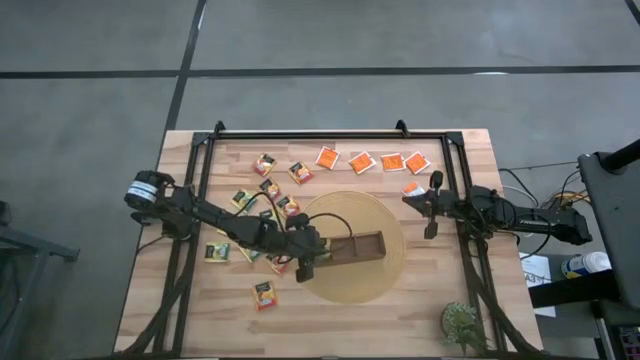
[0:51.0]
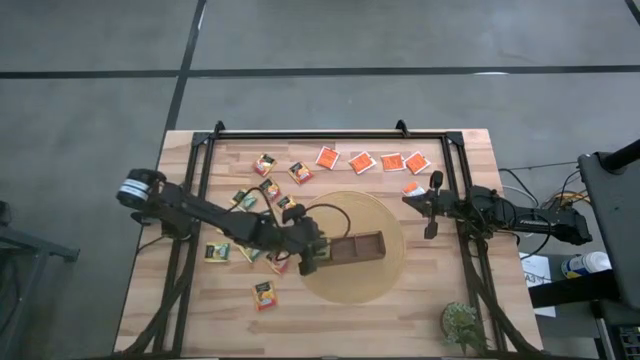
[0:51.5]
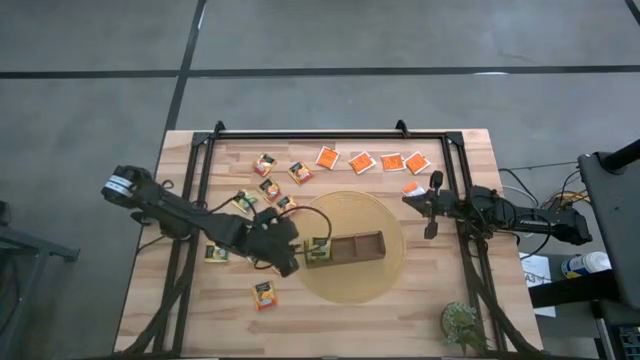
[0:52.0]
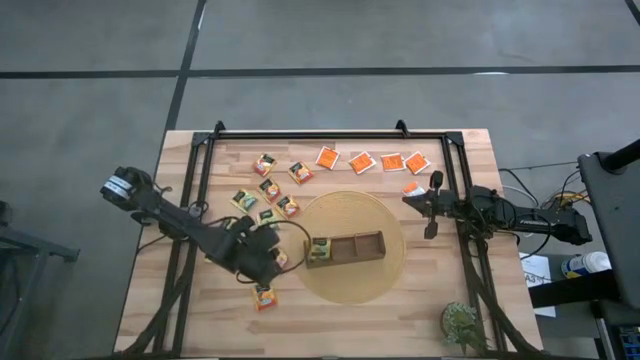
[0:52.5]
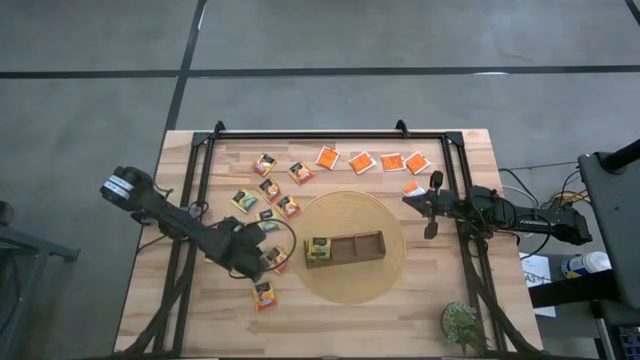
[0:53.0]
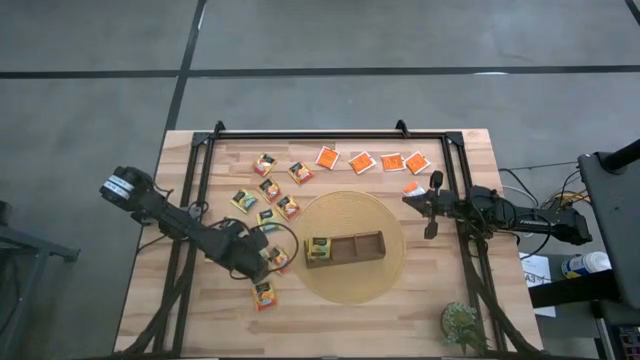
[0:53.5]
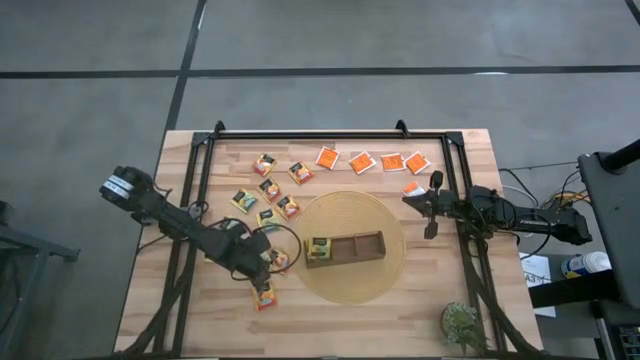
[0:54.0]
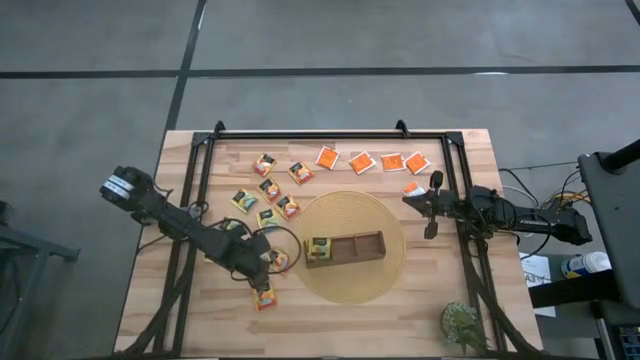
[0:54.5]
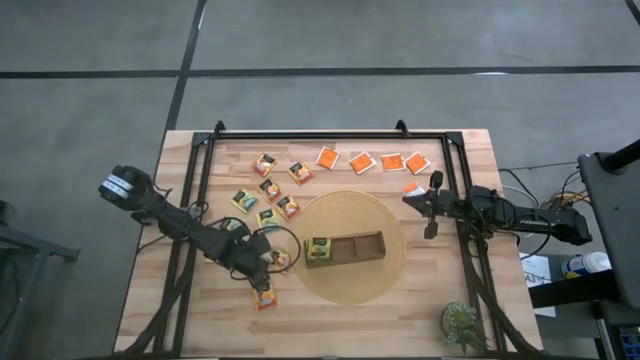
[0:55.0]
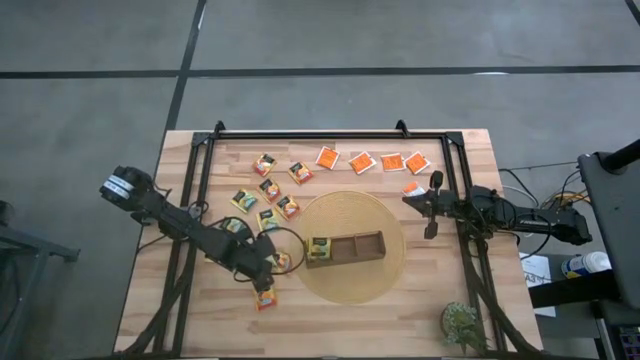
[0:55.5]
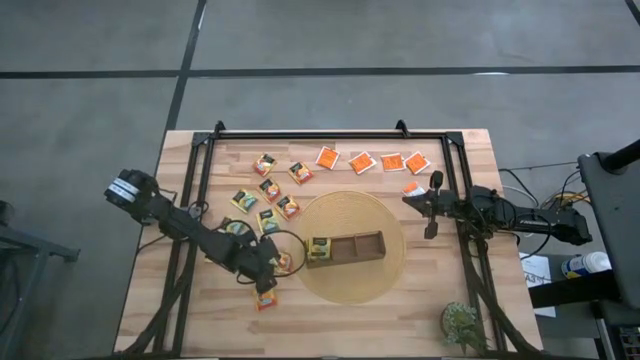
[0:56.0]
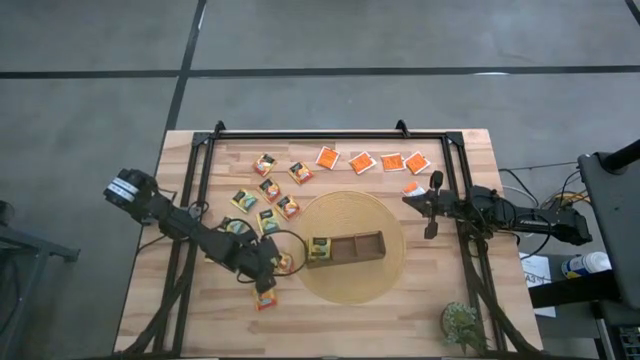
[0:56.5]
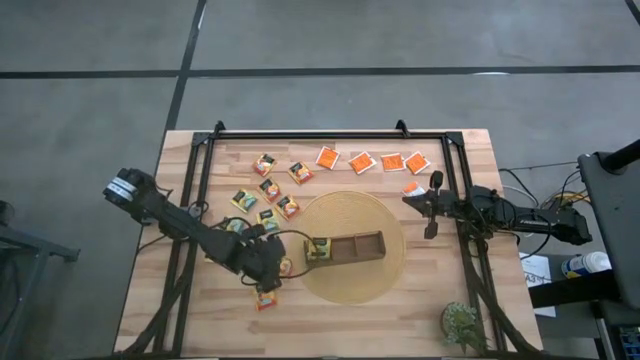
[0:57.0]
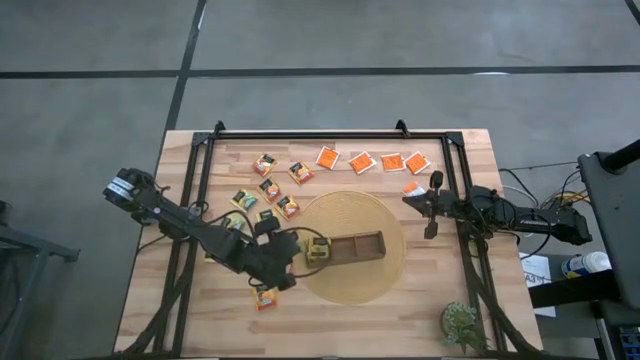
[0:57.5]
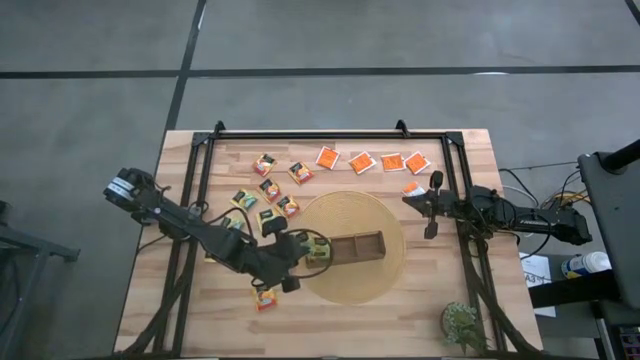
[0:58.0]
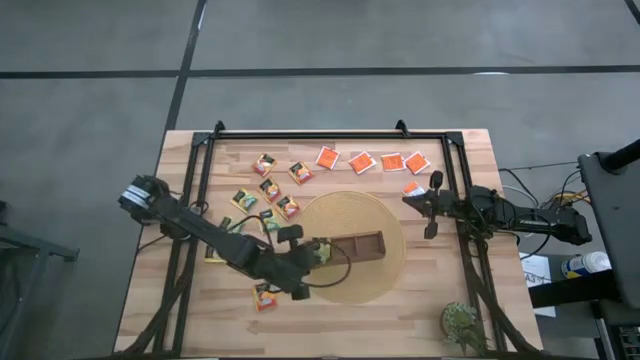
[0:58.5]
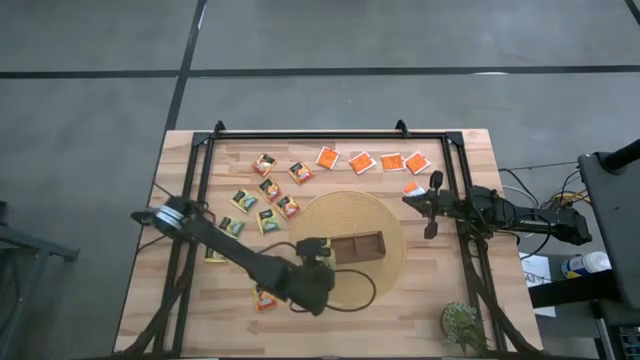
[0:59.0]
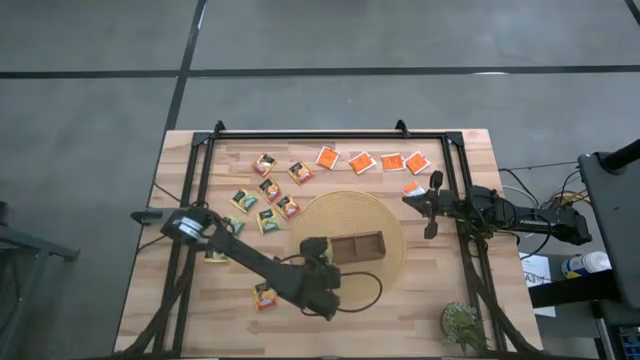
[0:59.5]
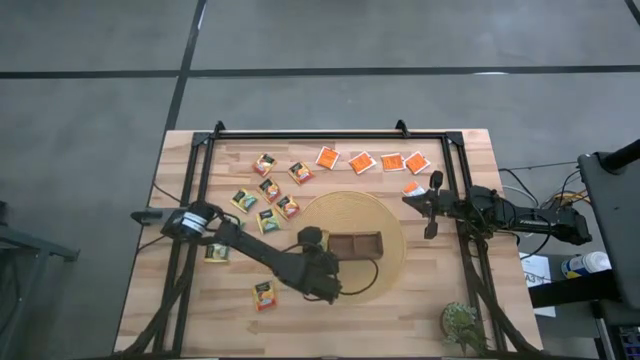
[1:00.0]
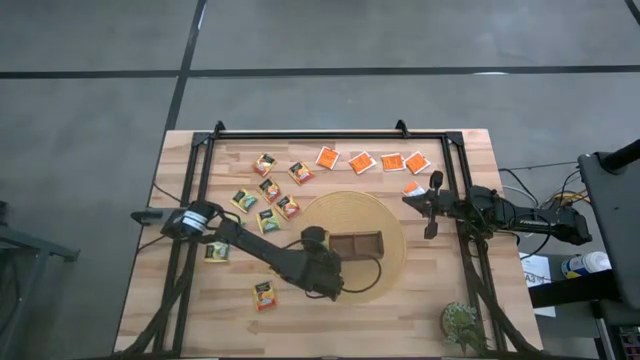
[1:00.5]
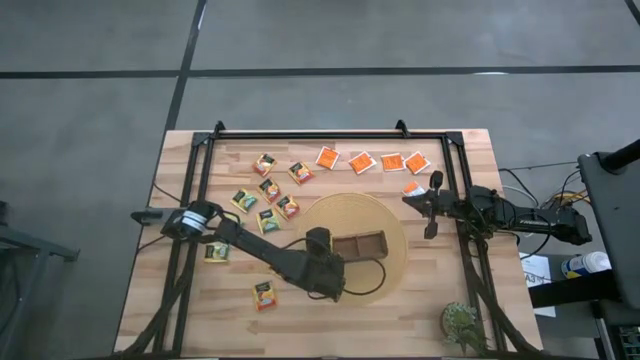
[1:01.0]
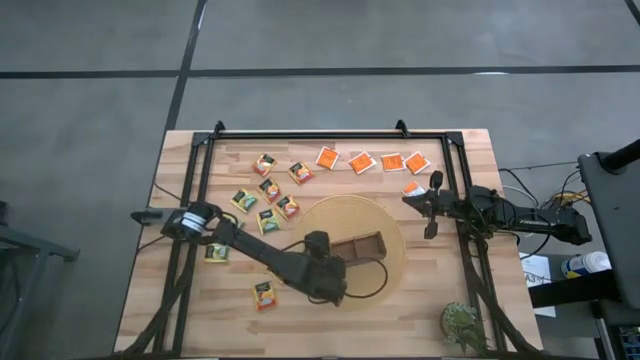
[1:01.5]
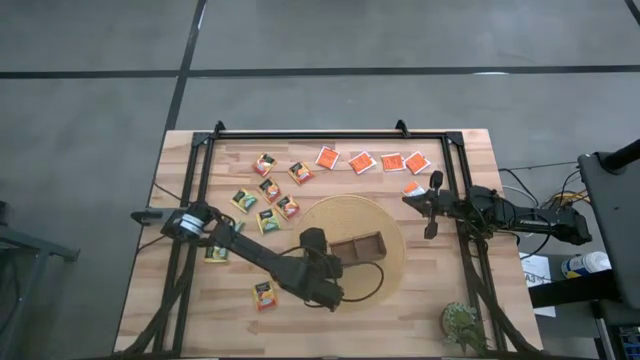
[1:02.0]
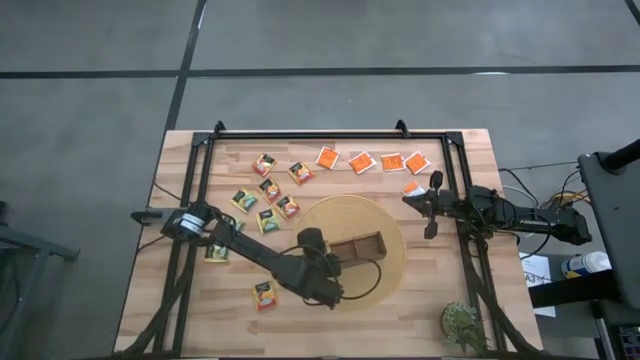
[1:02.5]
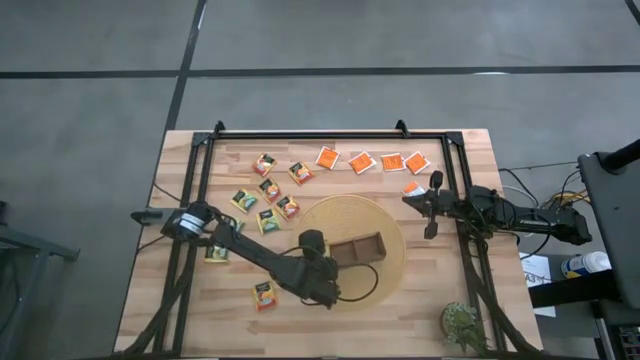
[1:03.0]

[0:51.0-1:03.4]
Task: Pick & Place Tea
Put the green tea bag into the left section of the wooden organizer

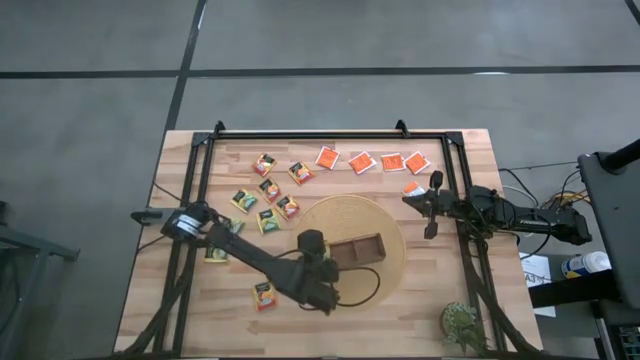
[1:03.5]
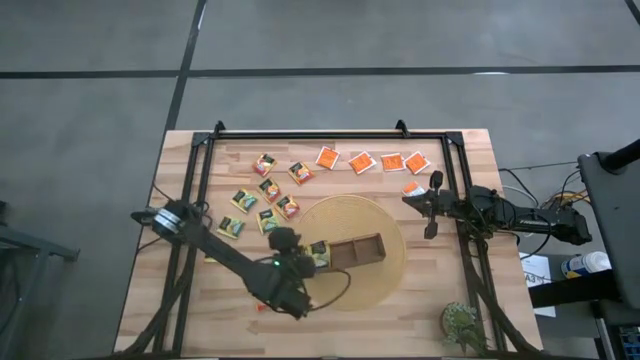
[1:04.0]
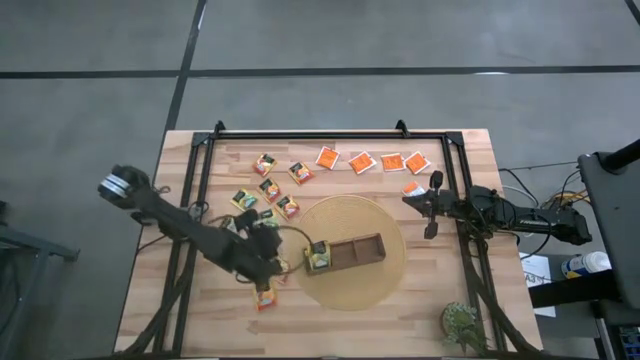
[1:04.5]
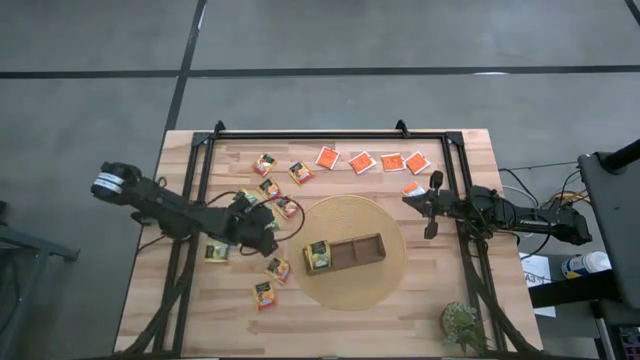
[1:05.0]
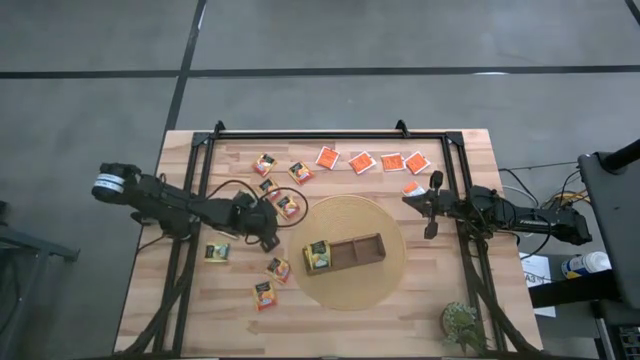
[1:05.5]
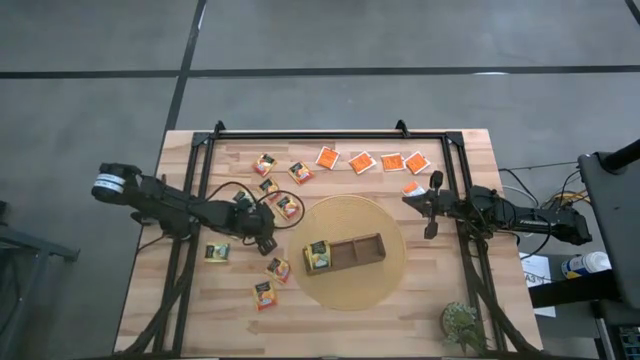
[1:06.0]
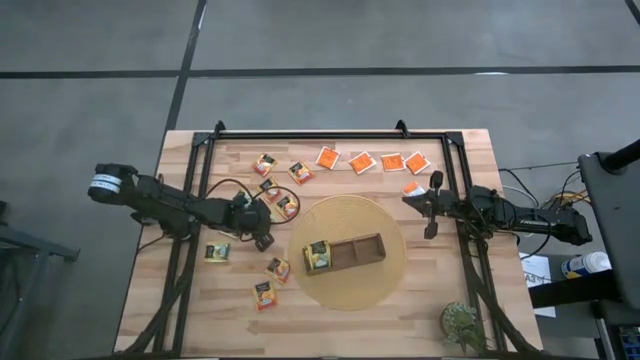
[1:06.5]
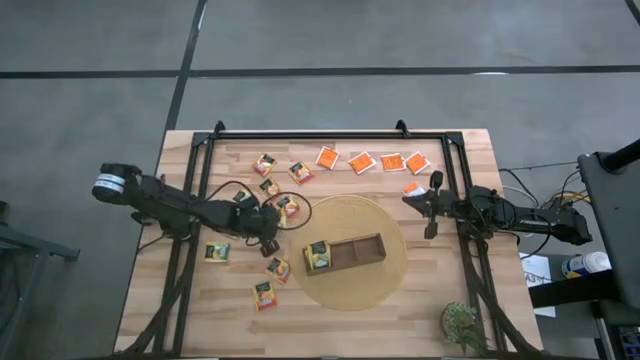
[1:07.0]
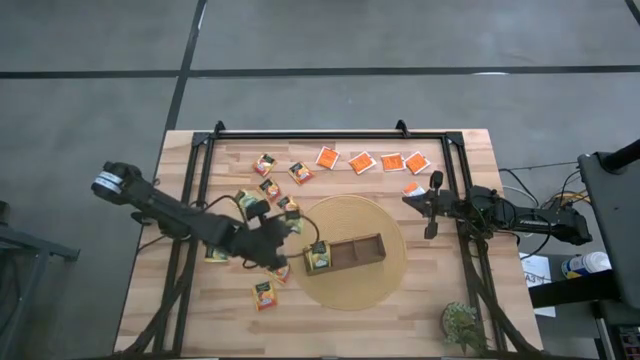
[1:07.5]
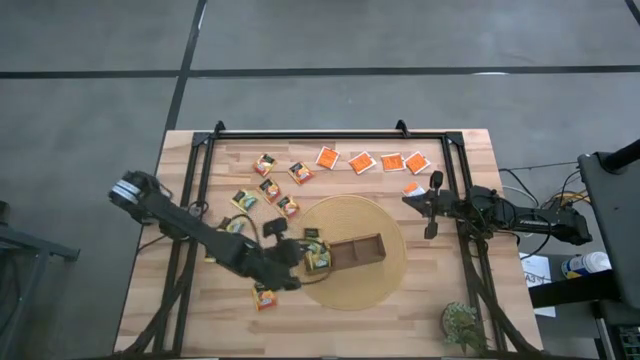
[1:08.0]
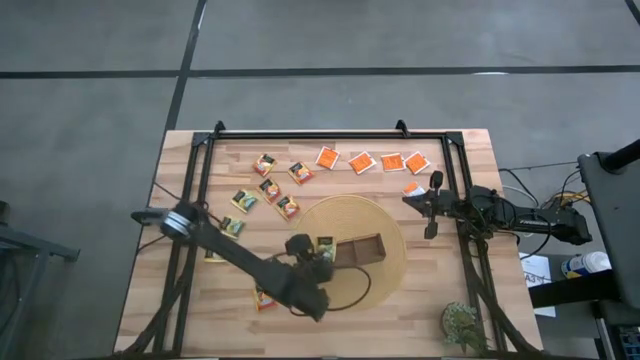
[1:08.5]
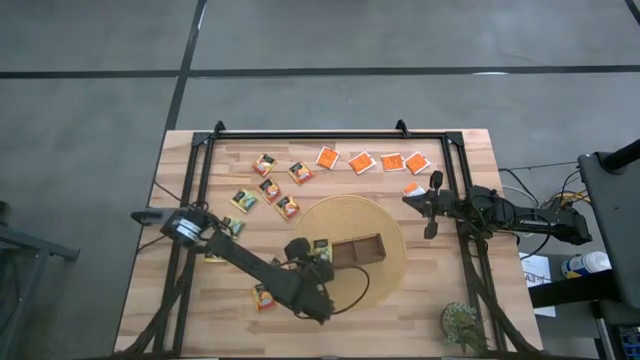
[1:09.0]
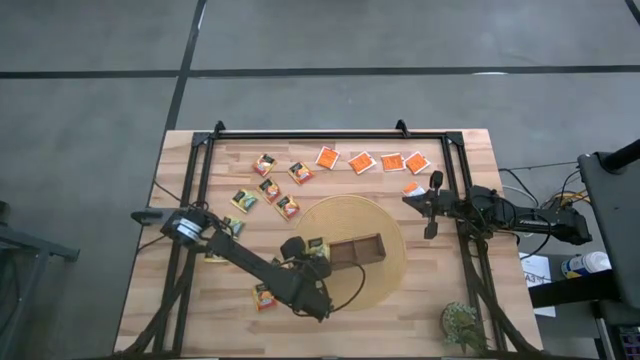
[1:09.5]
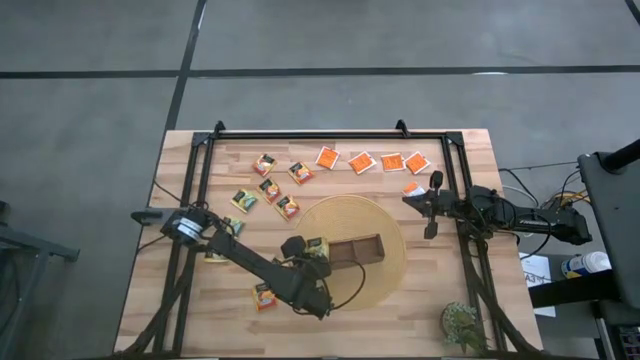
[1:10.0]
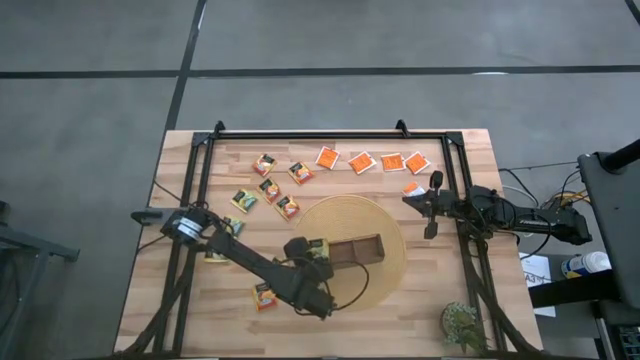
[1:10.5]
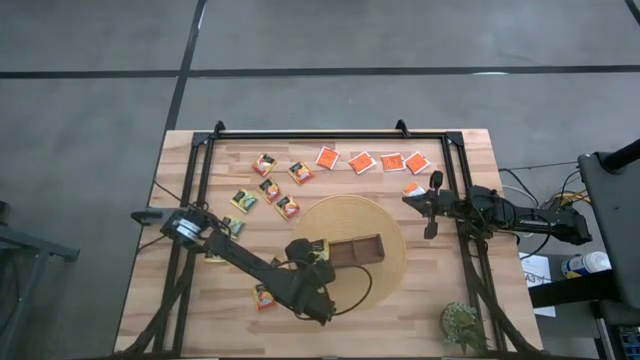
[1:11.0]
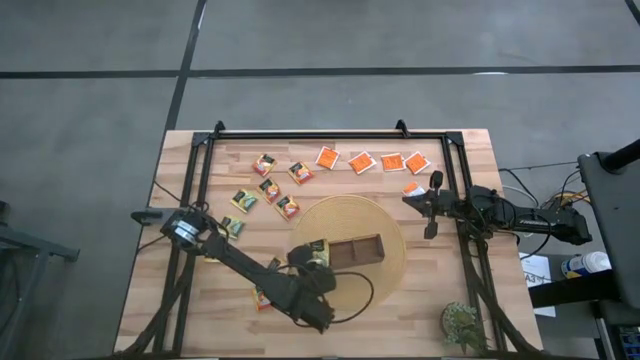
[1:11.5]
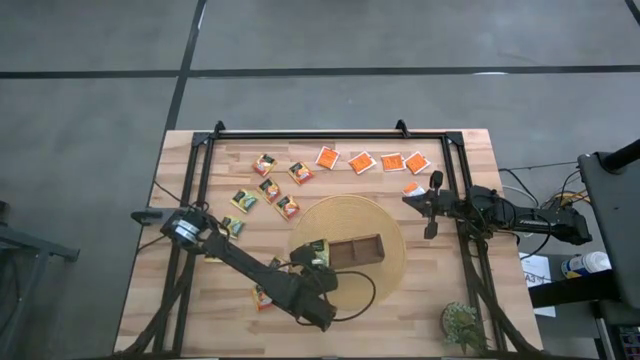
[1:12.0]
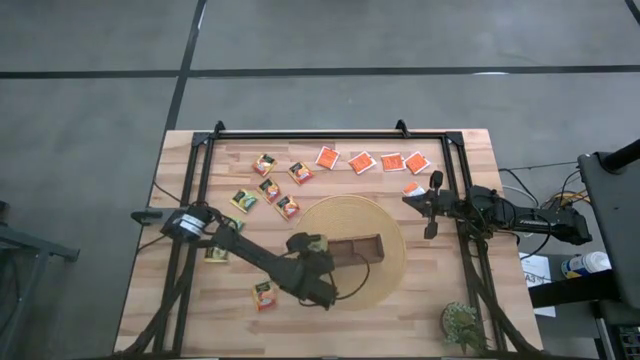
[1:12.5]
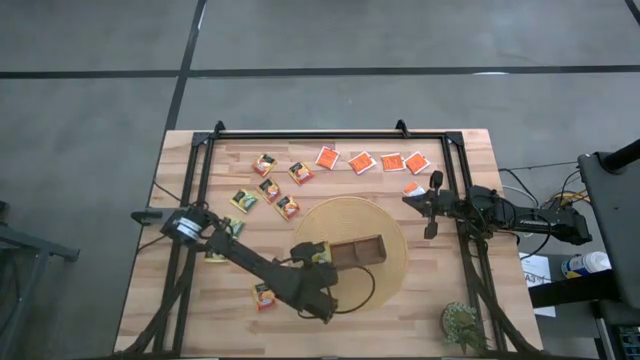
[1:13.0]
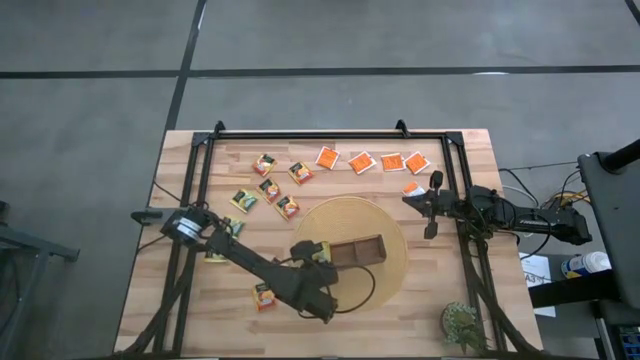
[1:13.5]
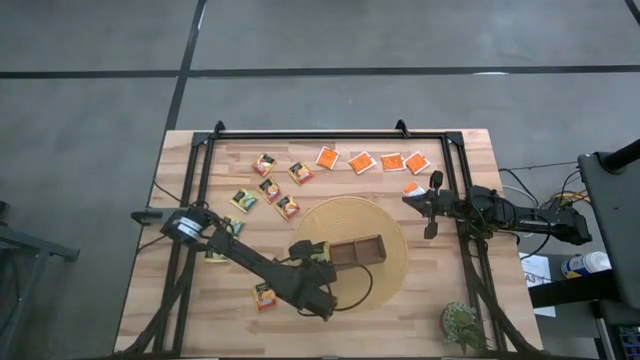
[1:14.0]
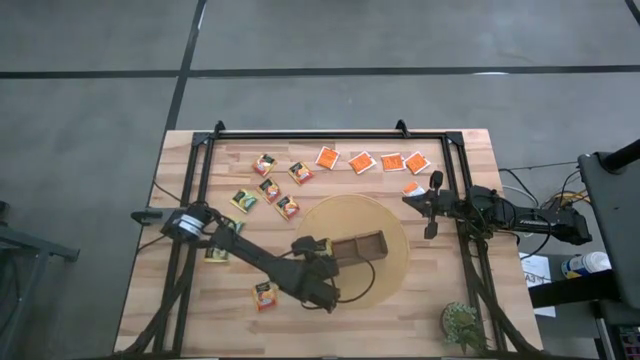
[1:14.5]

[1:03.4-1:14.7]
Put the green tea bag into the left section of the wooden organizer
